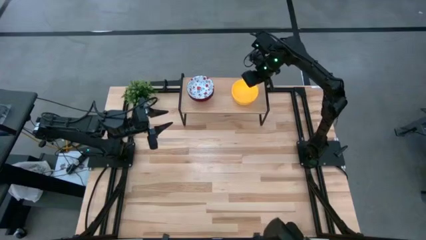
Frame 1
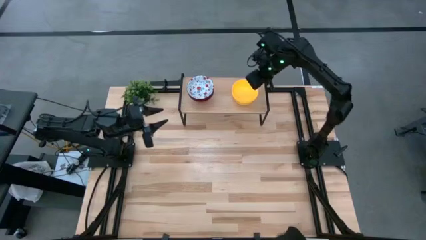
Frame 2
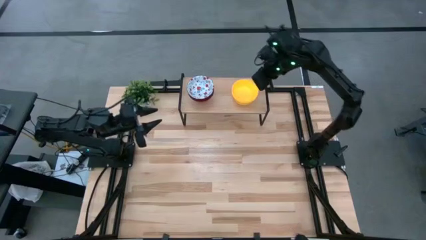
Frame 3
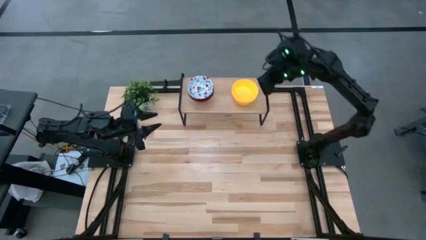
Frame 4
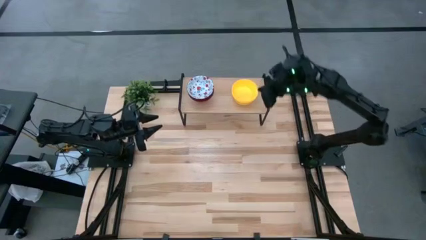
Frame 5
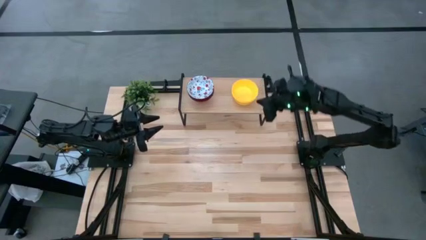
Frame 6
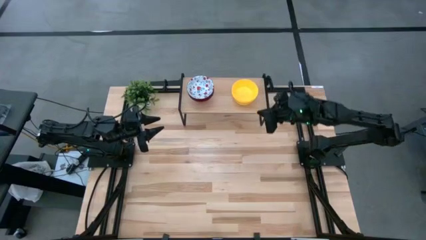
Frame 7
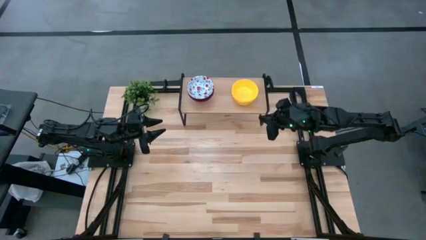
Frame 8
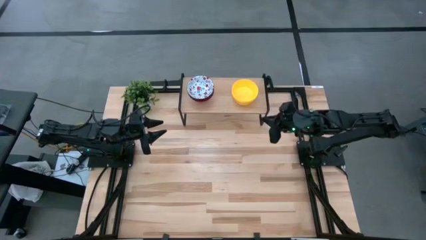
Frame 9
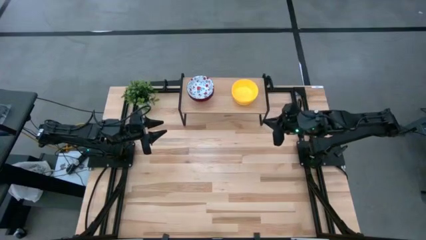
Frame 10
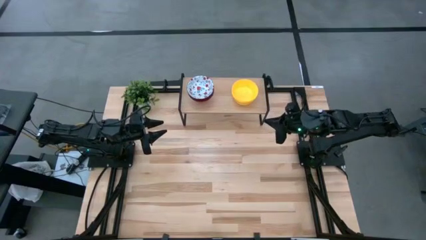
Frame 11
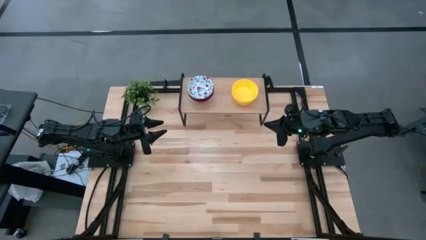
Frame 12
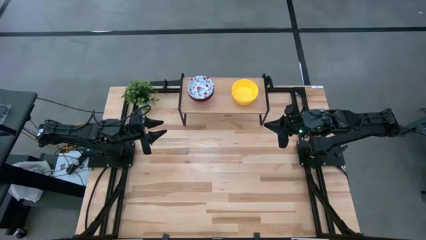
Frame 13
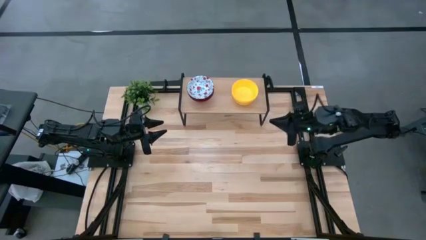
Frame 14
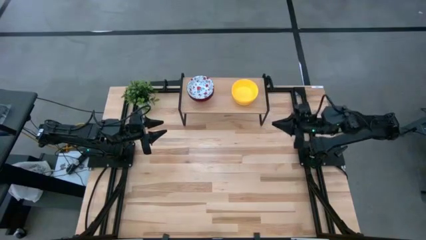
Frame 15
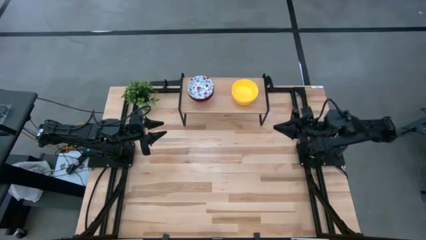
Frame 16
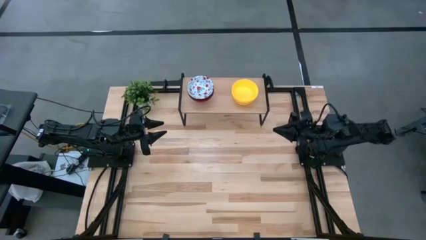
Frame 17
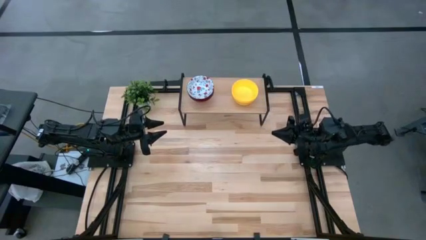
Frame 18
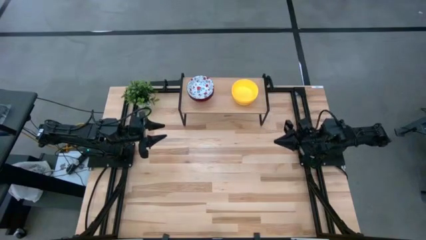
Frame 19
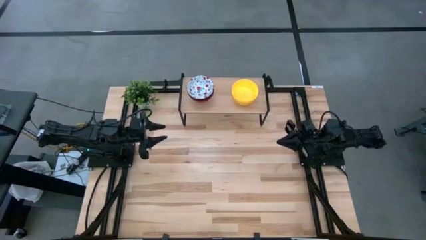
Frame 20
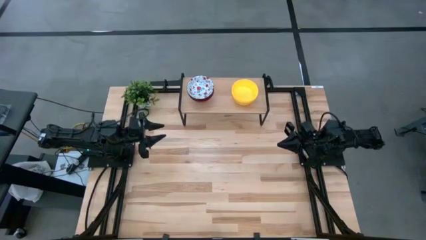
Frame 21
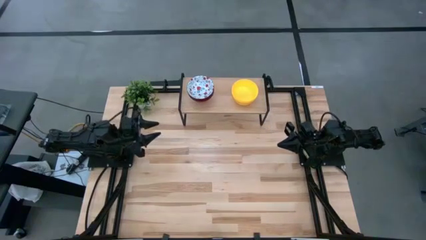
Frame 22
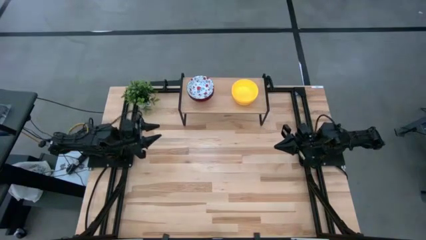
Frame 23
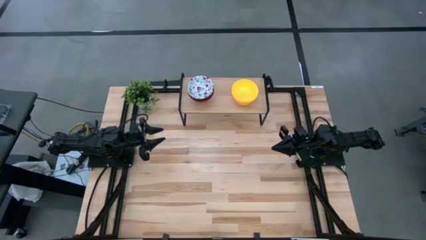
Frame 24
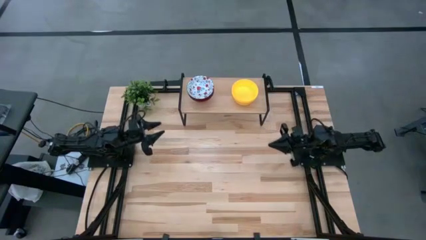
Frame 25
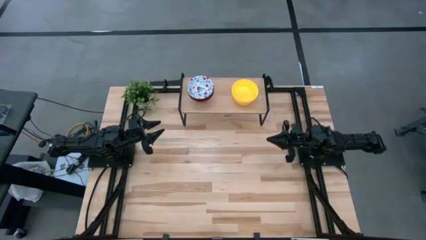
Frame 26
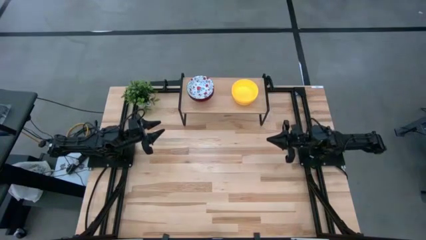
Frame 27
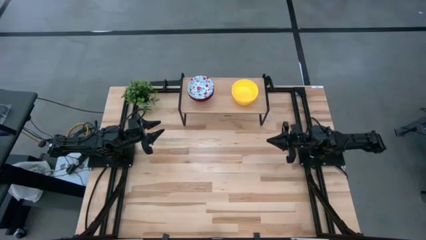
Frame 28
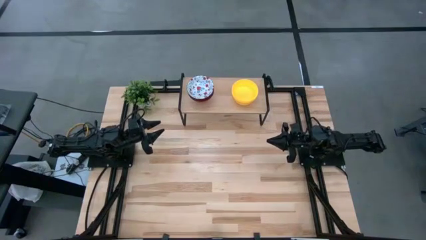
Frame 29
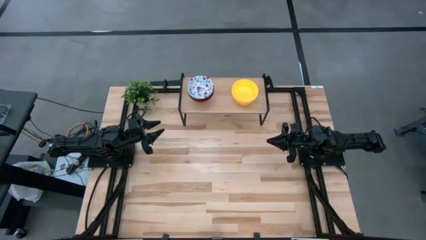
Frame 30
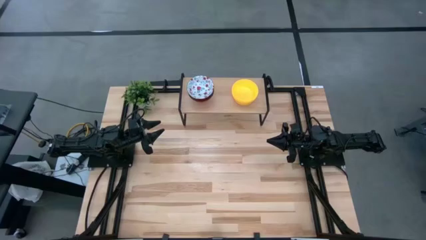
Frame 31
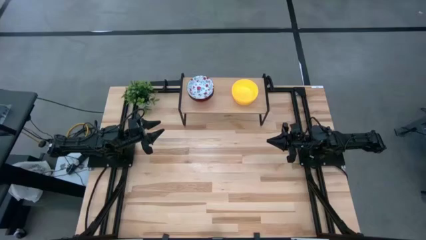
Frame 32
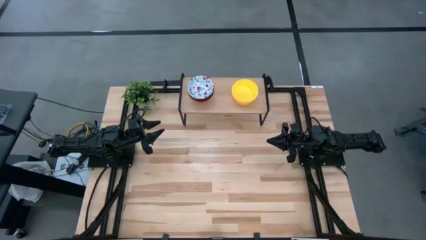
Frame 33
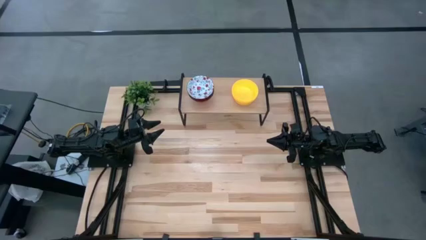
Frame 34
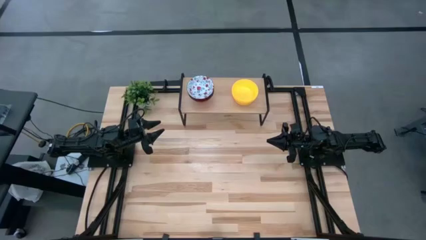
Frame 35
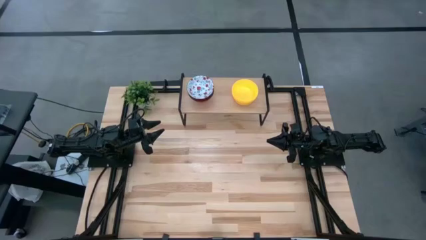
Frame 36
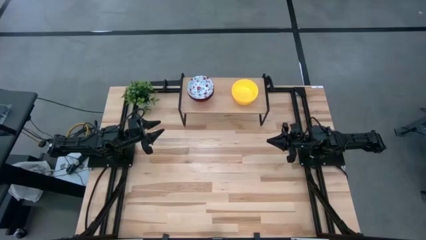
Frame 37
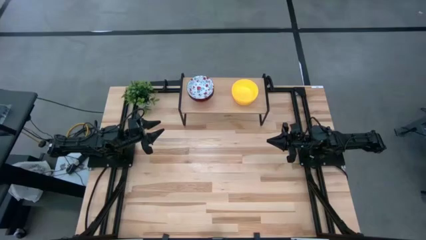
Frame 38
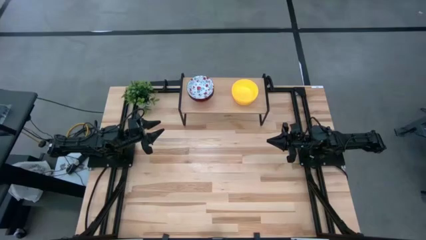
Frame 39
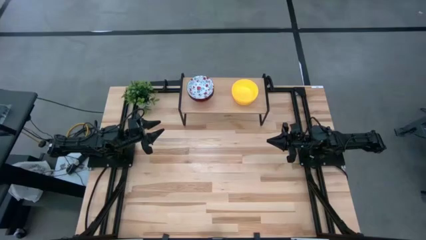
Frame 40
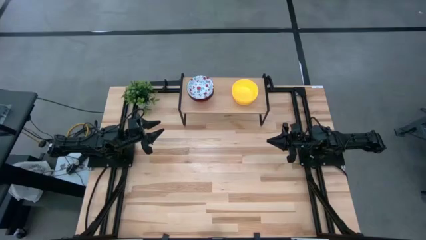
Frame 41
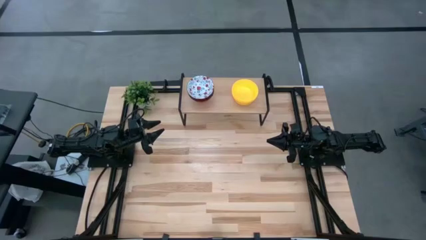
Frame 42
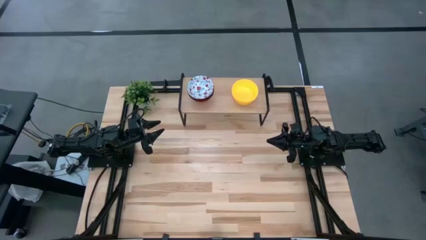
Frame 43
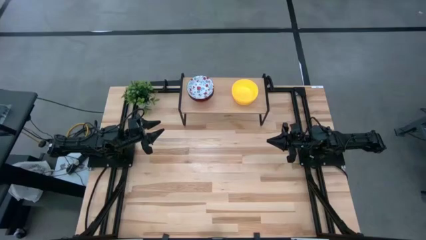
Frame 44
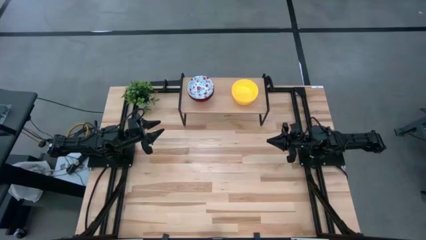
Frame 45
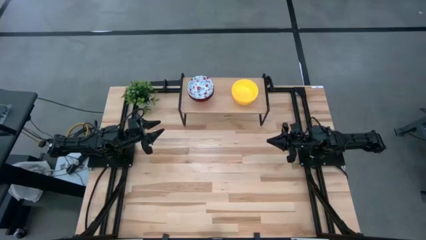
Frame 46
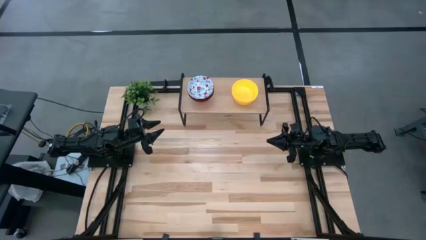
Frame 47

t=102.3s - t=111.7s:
Task: Pick & Place Mini bowls
Return to Home Position

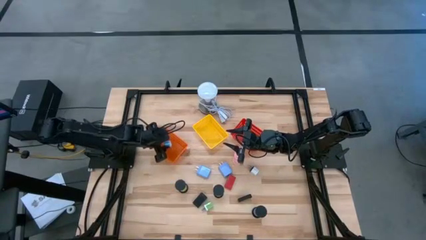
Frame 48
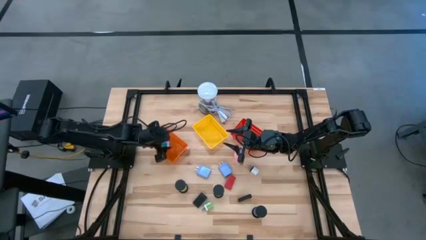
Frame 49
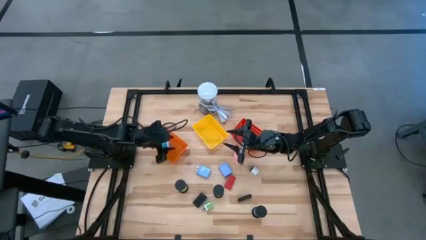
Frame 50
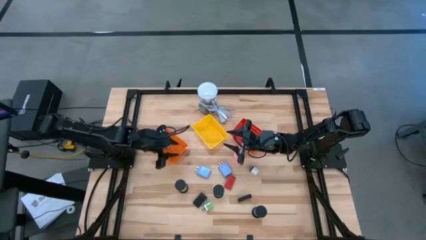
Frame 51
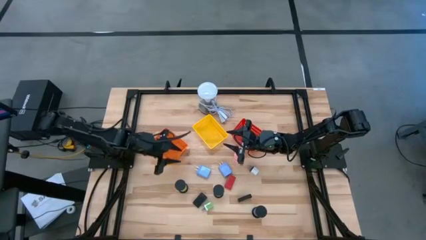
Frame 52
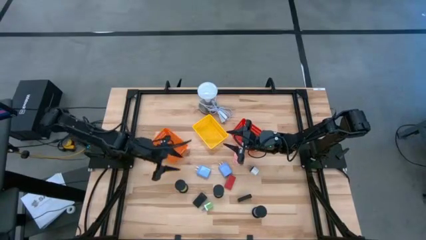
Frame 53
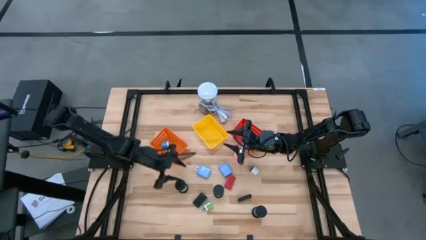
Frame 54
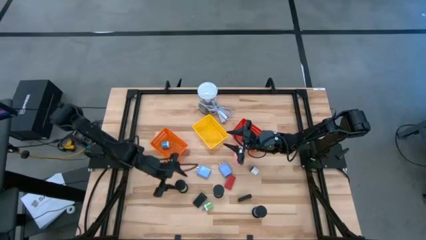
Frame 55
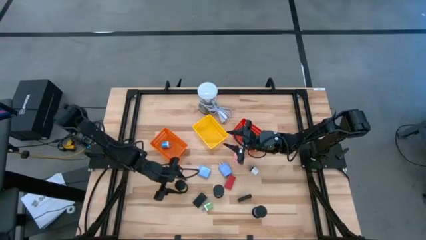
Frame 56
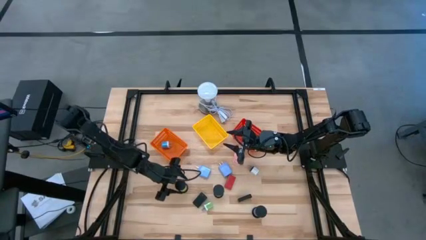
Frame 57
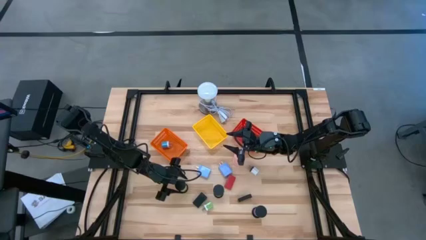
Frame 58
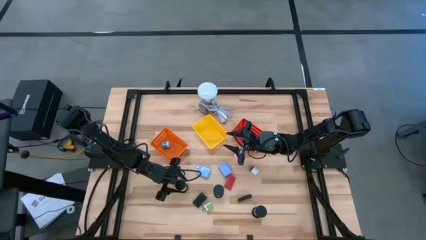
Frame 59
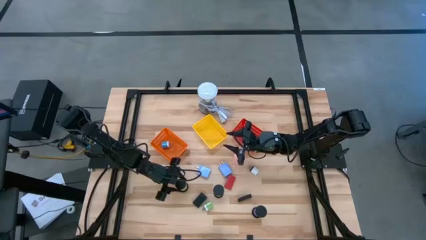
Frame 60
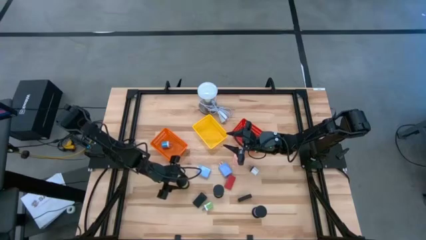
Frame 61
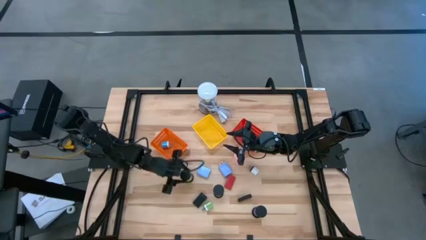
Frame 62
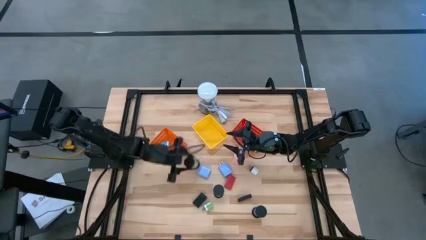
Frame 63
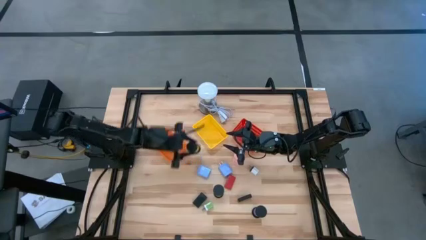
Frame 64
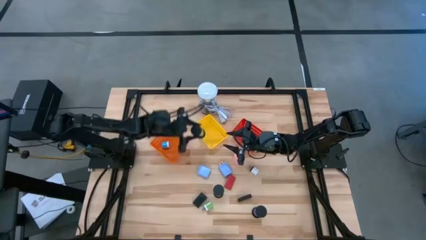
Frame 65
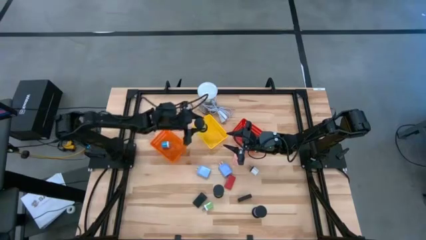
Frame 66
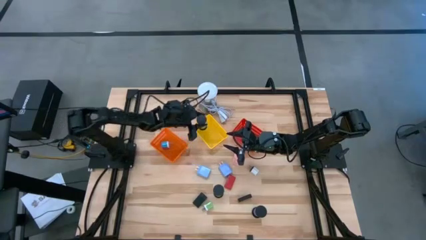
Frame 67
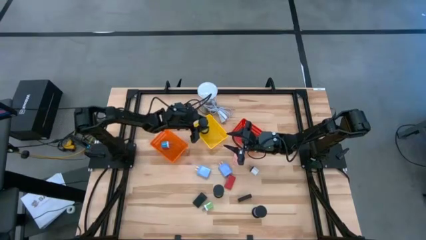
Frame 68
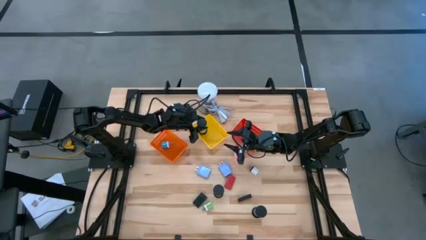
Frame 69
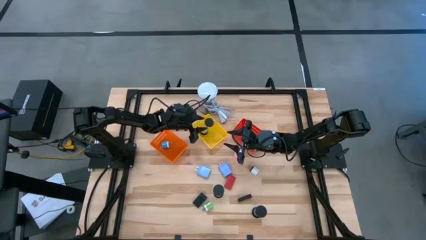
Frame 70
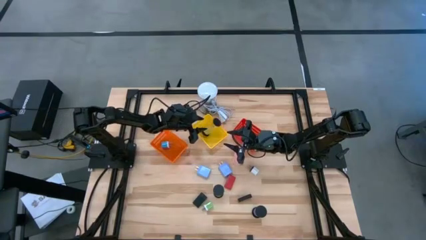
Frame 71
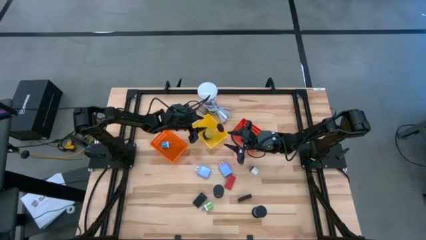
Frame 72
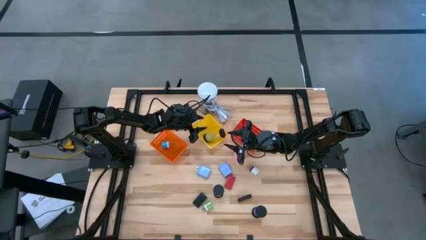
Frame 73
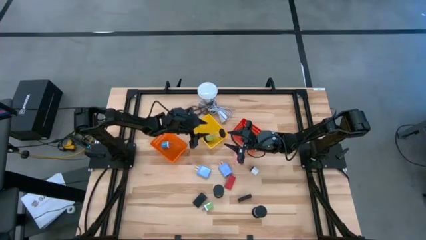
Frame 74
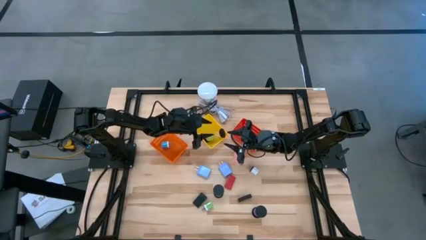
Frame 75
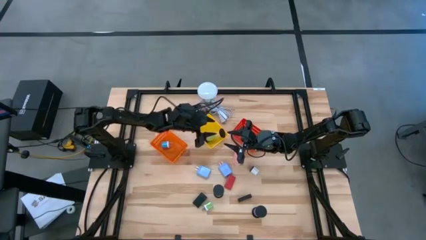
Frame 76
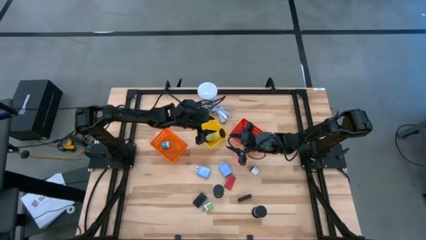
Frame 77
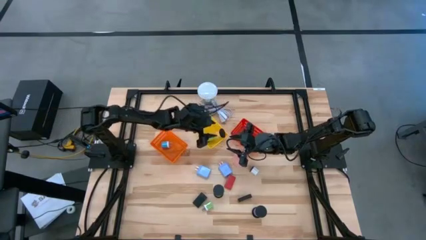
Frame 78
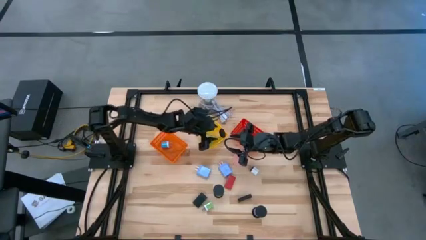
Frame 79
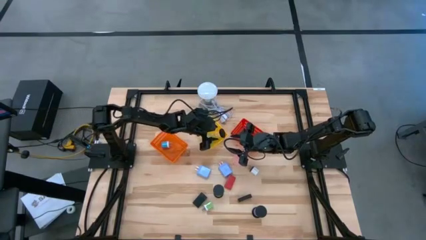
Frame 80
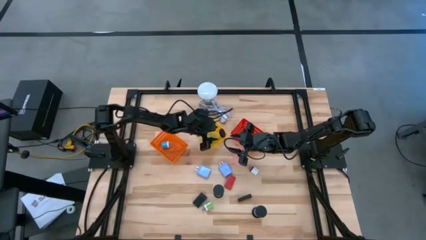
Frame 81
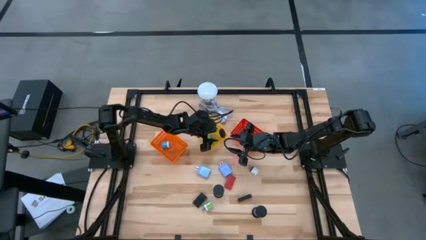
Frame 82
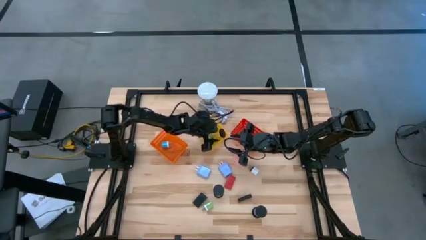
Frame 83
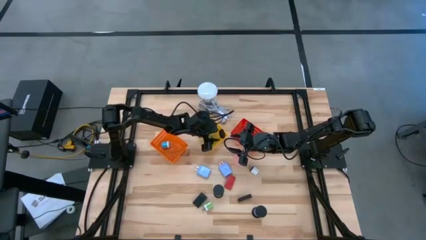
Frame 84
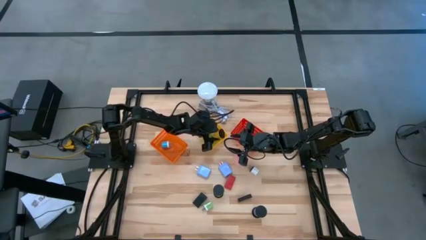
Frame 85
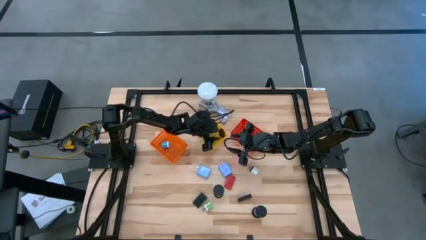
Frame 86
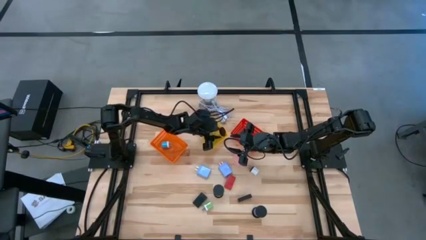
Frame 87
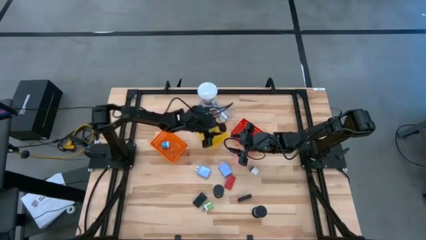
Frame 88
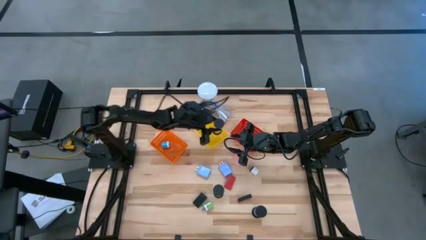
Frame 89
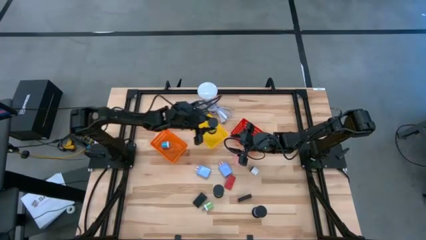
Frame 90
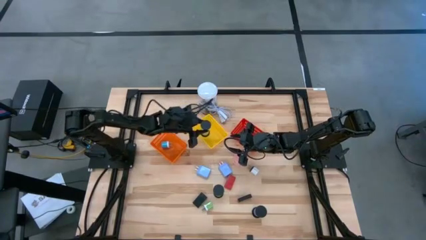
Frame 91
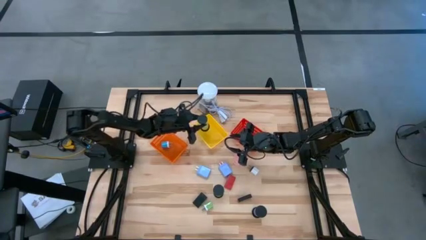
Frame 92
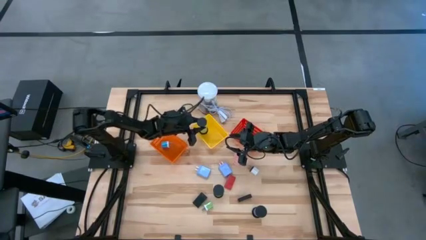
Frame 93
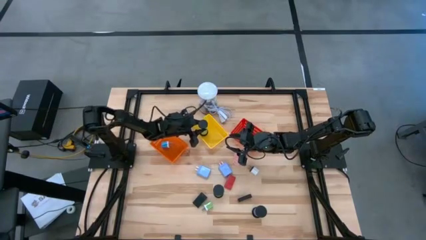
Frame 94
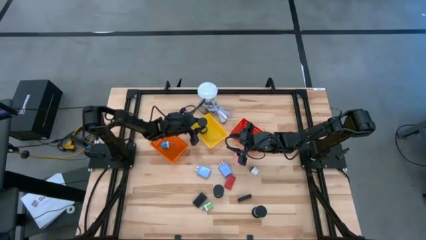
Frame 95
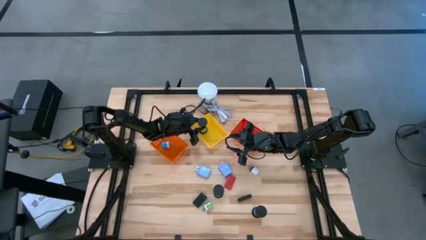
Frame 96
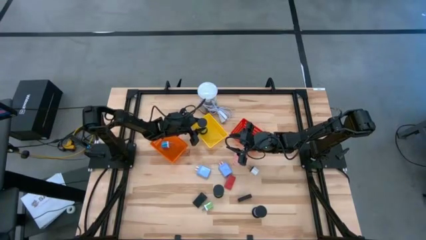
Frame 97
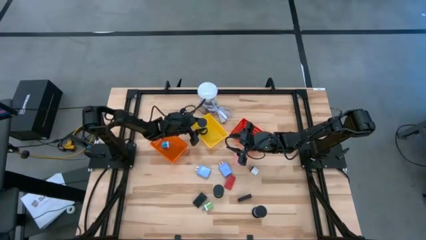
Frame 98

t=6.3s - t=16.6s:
Task: Pick & Place Office items
Put the left green hourglass into the yellow basket
